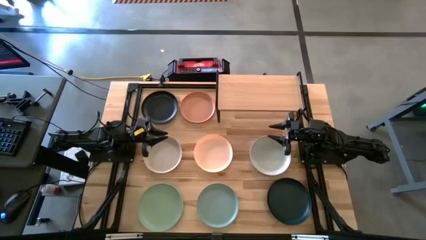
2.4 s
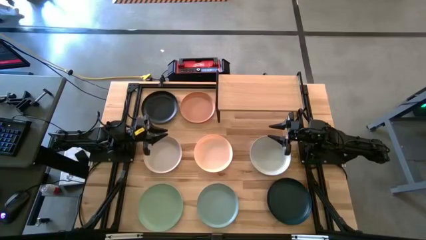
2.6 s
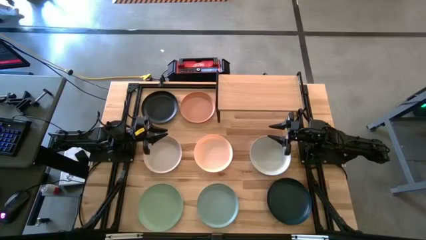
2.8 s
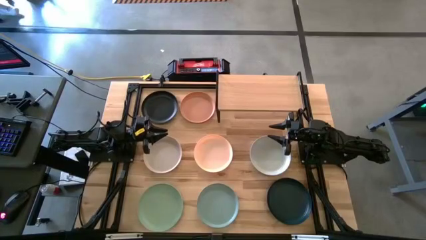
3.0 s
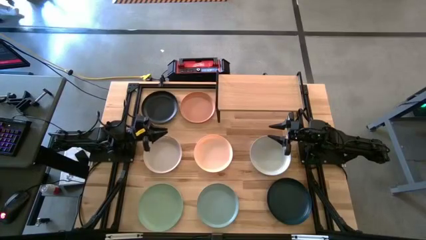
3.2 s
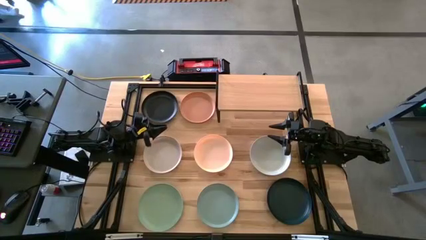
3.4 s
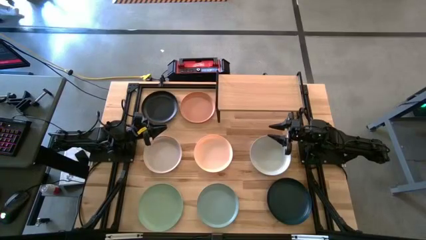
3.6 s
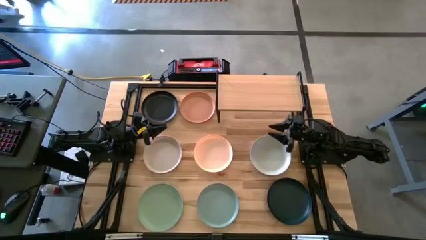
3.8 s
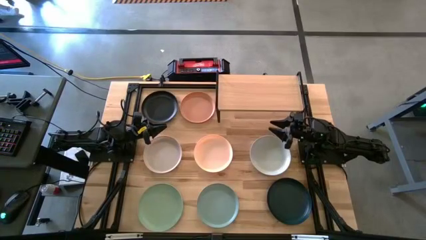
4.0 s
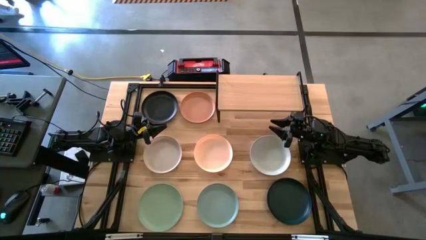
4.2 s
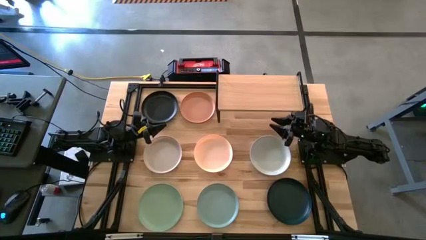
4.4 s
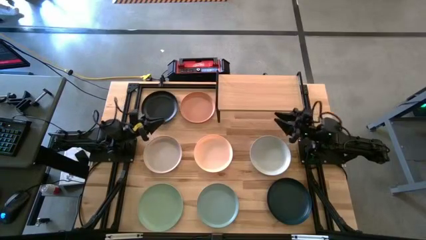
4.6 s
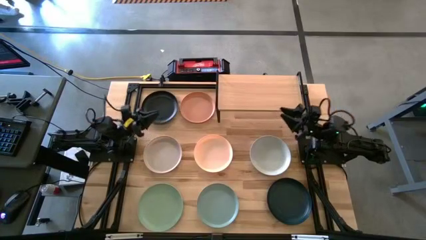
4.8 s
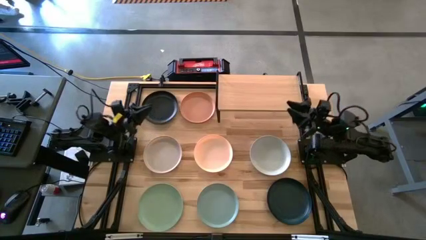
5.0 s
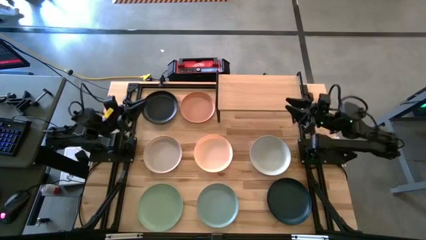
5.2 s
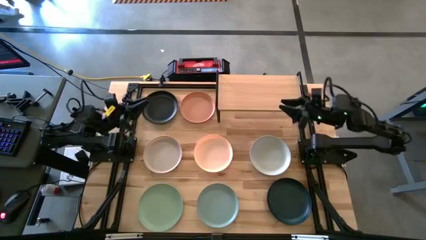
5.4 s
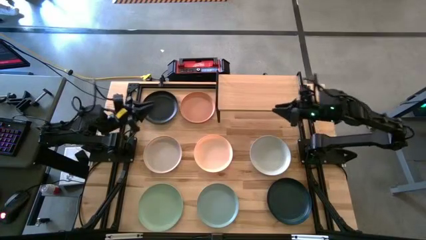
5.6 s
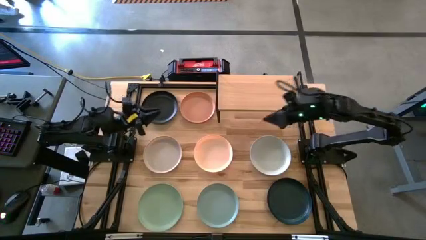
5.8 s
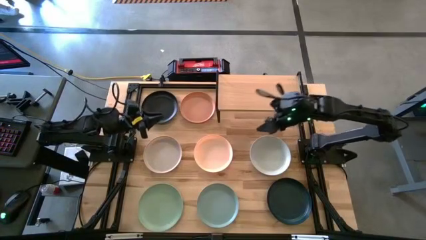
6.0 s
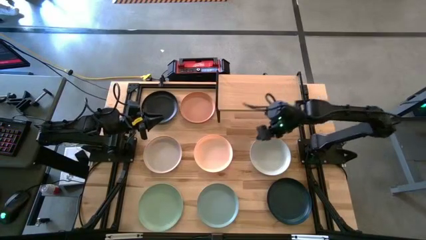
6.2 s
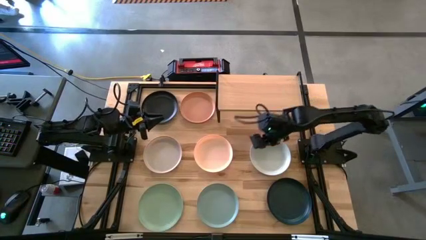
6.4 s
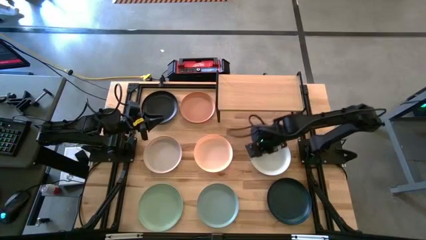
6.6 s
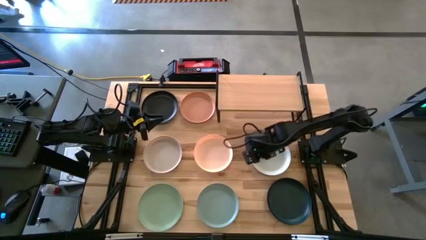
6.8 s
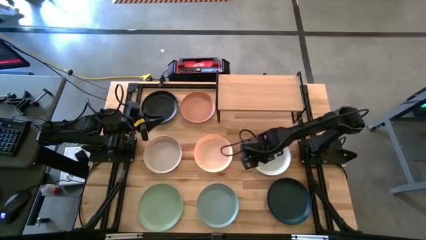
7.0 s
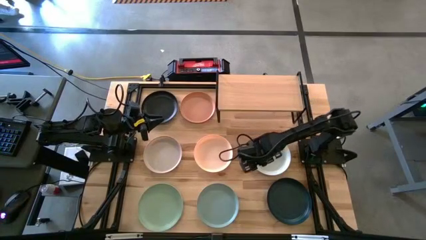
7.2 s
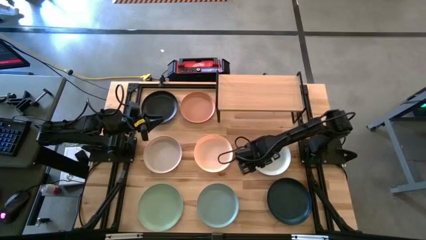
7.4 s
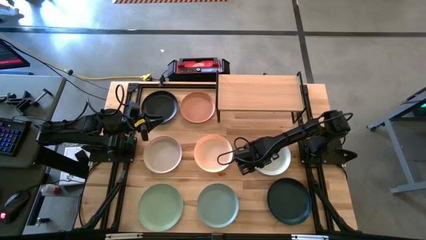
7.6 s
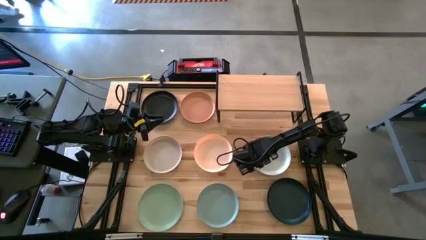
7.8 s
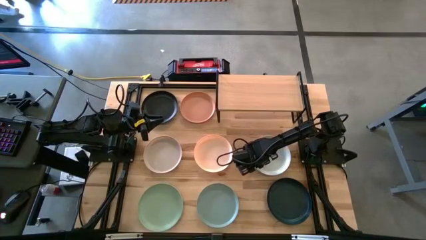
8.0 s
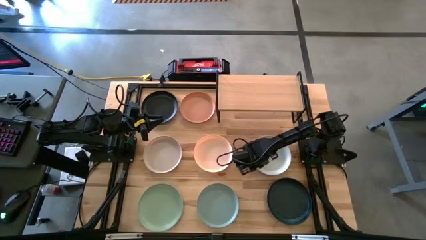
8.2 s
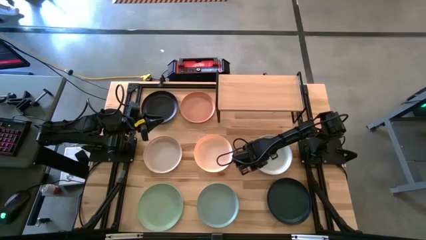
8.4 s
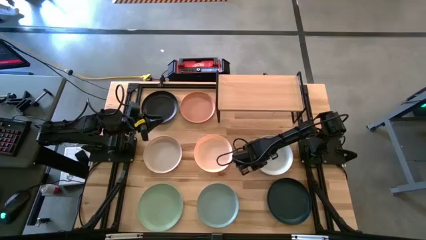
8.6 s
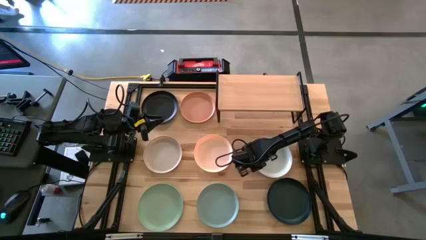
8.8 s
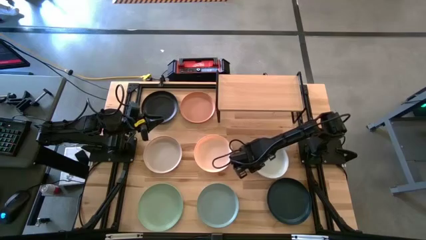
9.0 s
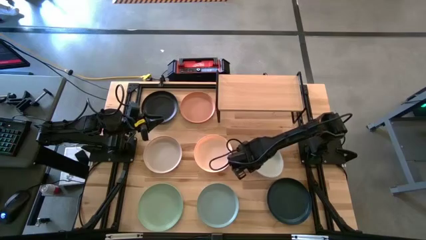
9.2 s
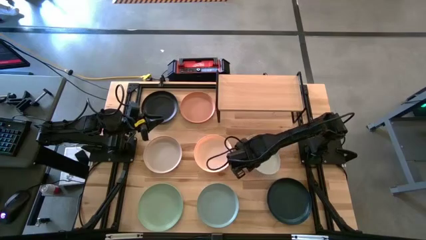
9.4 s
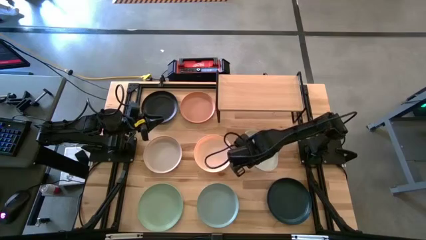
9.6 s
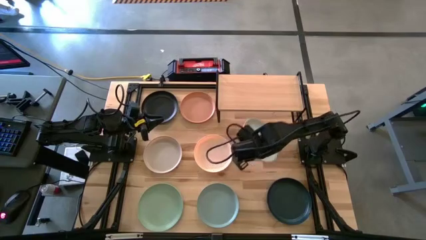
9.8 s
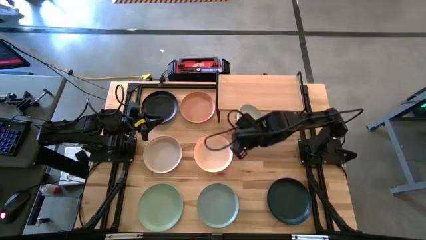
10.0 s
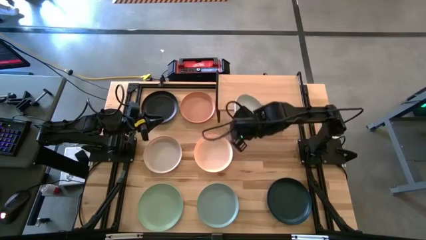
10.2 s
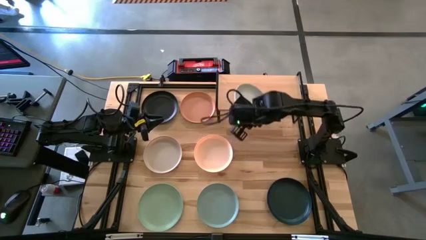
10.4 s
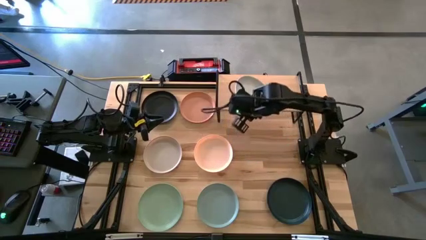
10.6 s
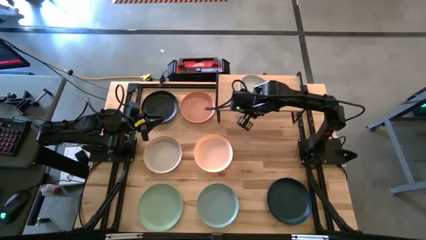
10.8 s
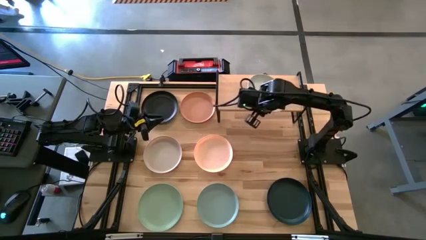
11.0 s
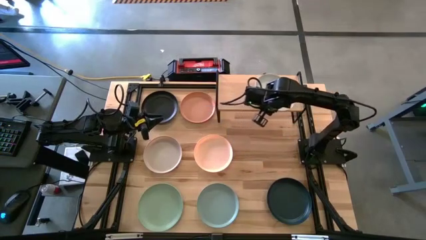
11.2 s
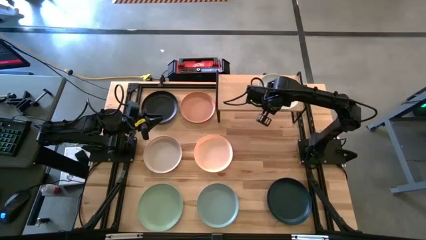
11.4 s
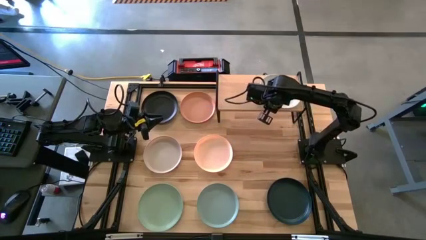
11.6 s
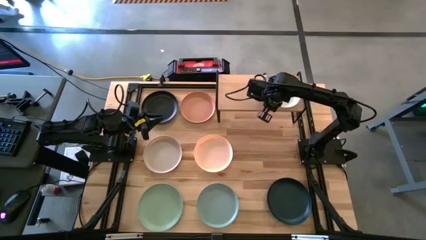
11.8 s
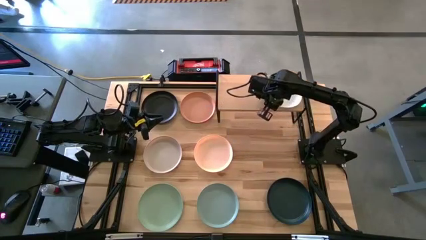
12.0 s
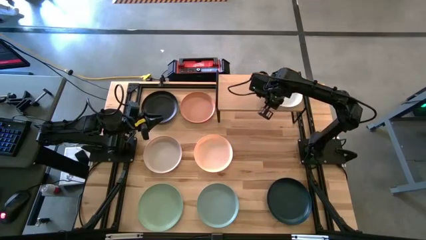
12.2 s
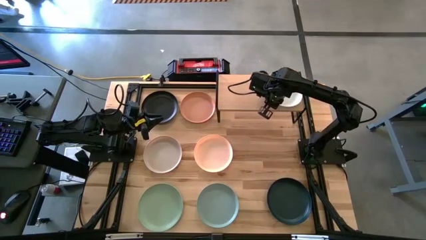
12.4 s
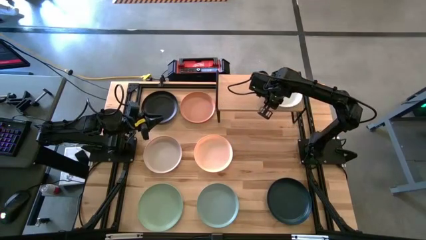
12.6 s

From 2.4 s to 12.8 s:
Task: Place and stack plates onto a shelf
Put the white plate on the shelf
